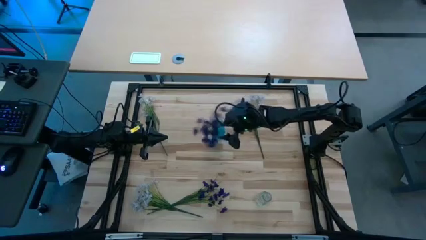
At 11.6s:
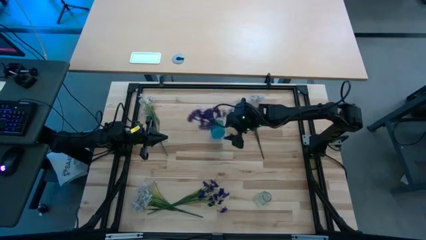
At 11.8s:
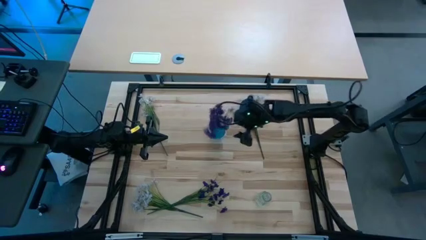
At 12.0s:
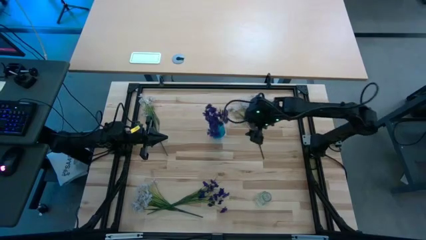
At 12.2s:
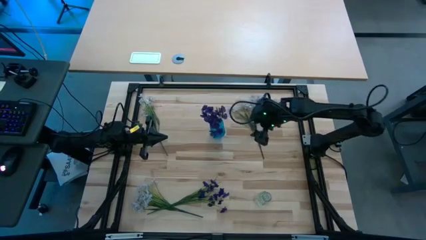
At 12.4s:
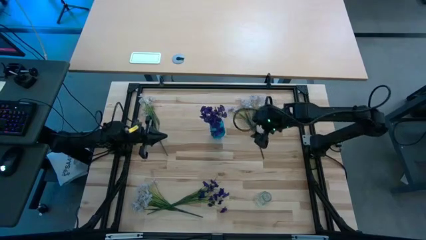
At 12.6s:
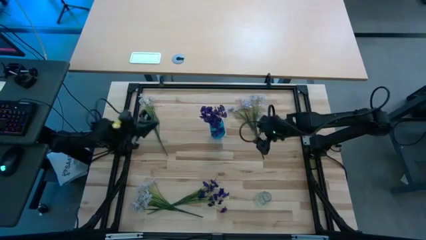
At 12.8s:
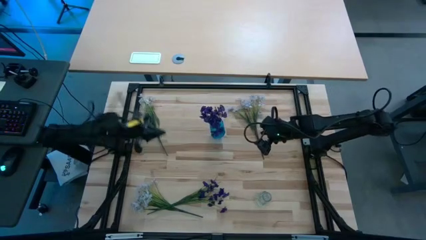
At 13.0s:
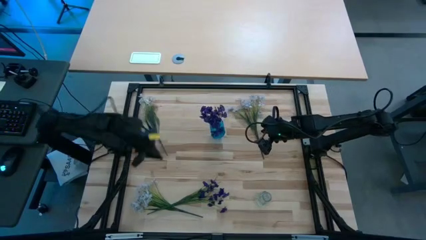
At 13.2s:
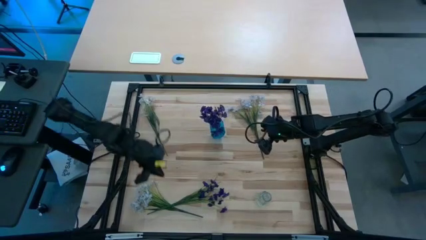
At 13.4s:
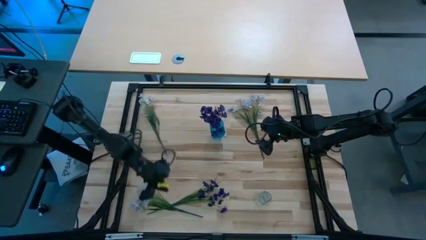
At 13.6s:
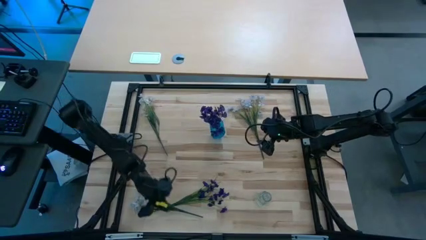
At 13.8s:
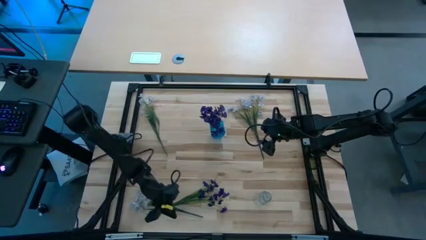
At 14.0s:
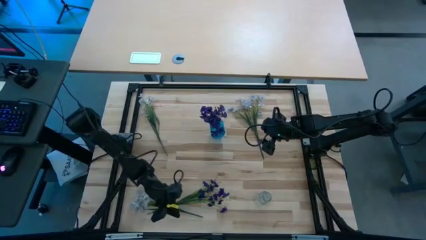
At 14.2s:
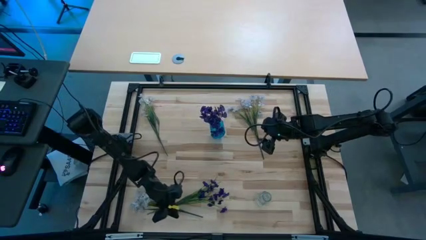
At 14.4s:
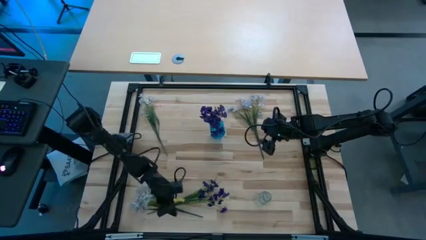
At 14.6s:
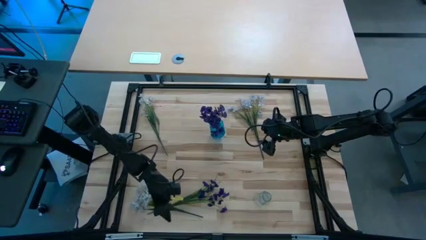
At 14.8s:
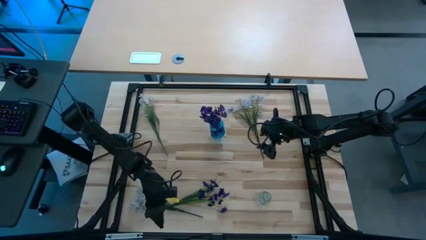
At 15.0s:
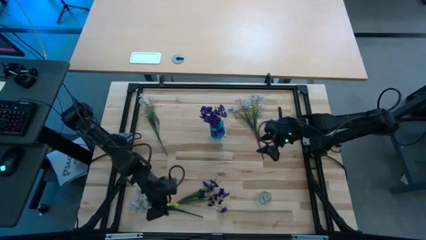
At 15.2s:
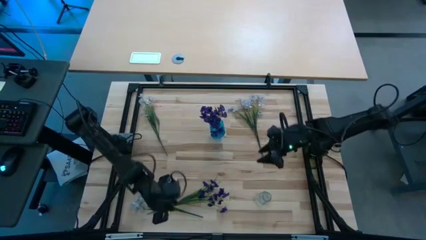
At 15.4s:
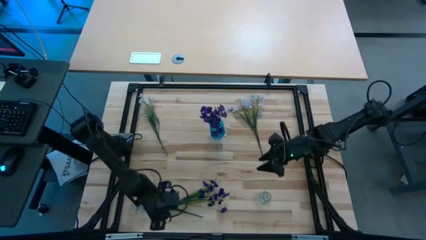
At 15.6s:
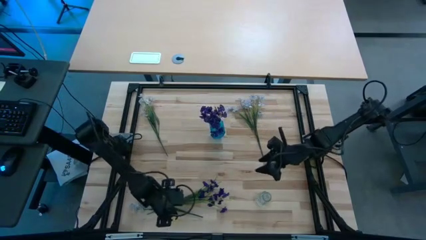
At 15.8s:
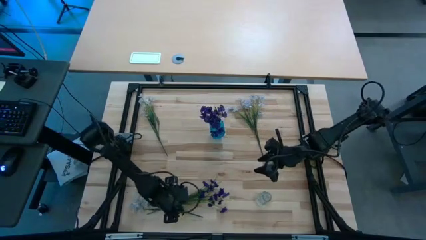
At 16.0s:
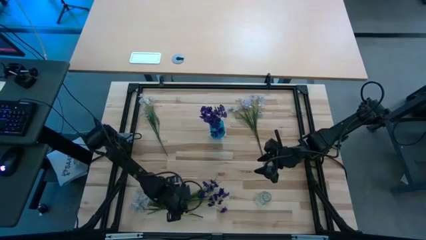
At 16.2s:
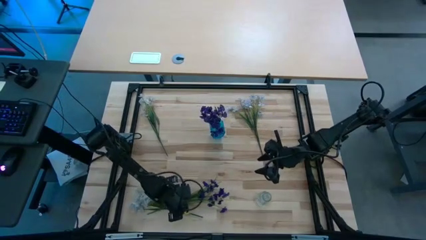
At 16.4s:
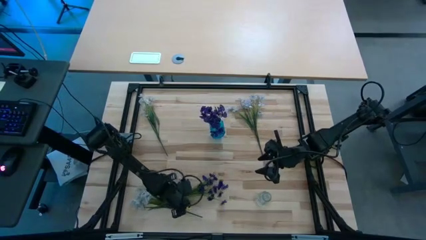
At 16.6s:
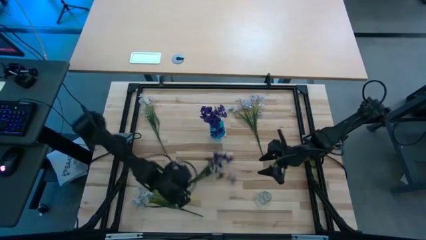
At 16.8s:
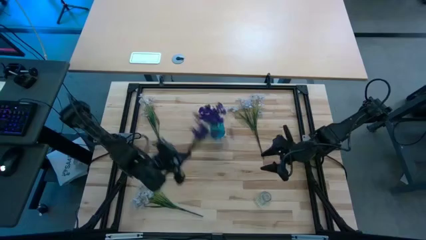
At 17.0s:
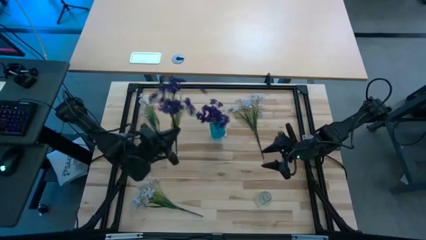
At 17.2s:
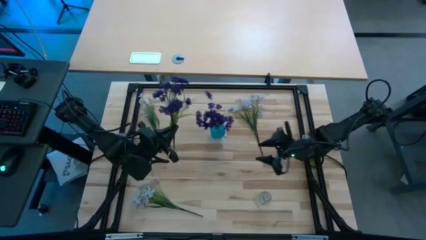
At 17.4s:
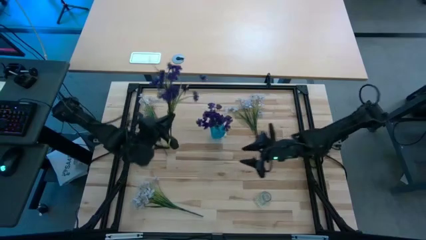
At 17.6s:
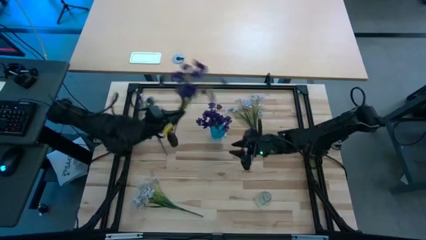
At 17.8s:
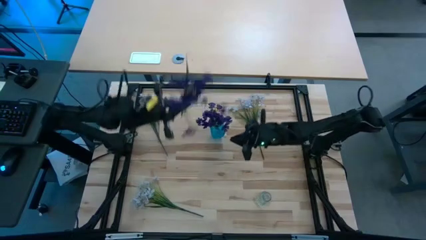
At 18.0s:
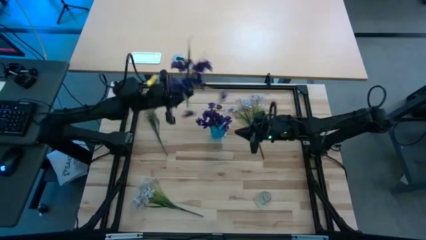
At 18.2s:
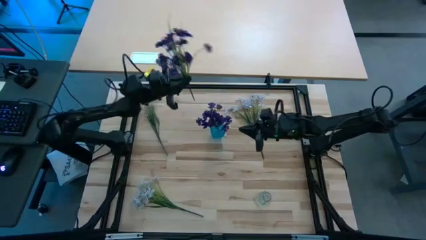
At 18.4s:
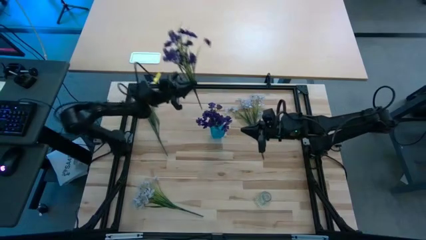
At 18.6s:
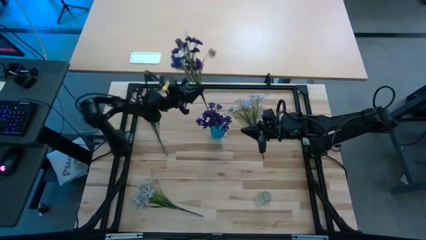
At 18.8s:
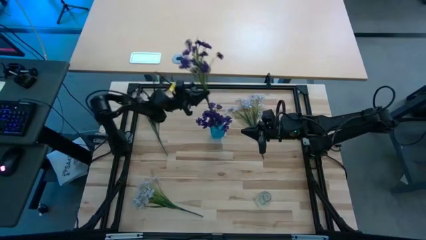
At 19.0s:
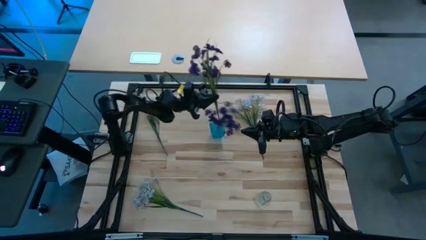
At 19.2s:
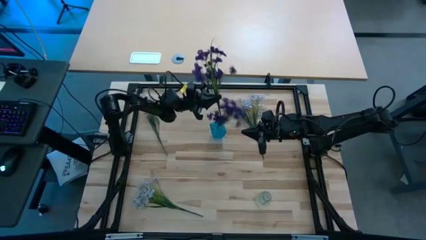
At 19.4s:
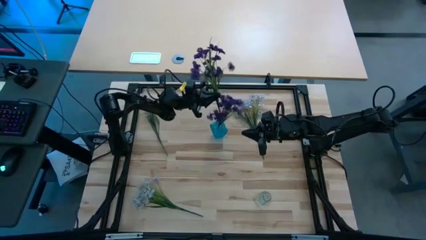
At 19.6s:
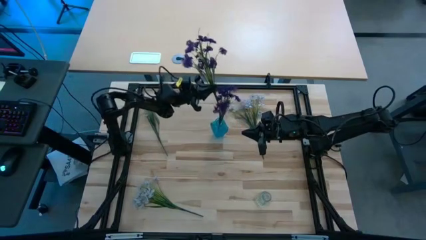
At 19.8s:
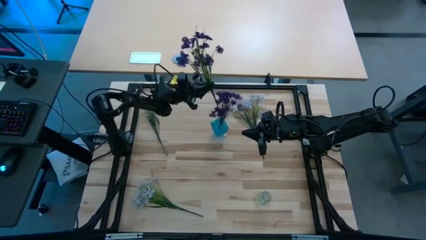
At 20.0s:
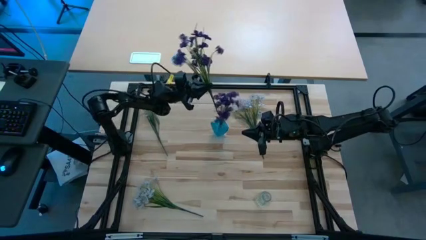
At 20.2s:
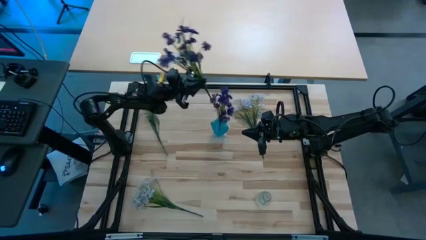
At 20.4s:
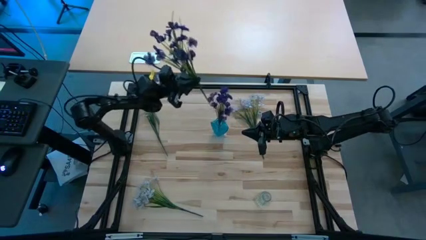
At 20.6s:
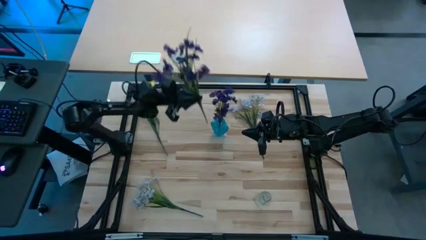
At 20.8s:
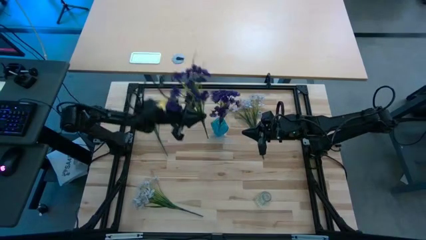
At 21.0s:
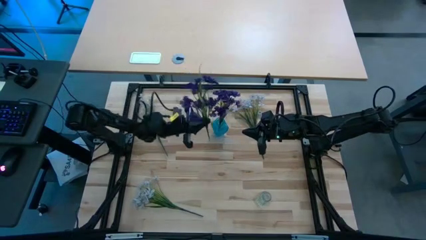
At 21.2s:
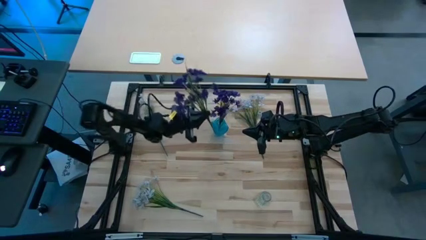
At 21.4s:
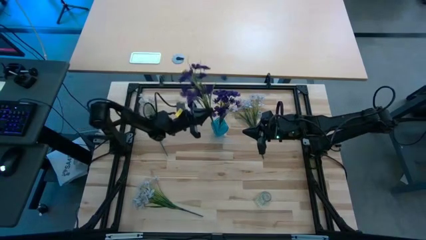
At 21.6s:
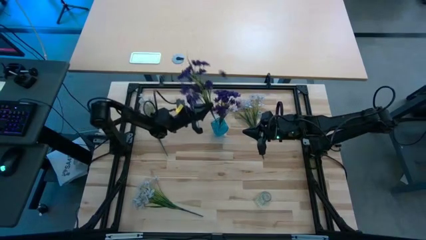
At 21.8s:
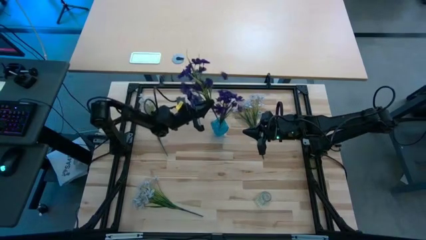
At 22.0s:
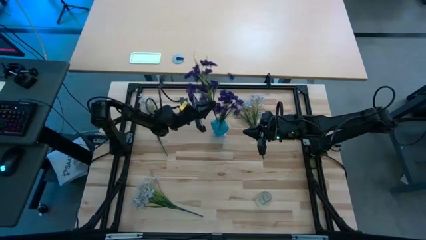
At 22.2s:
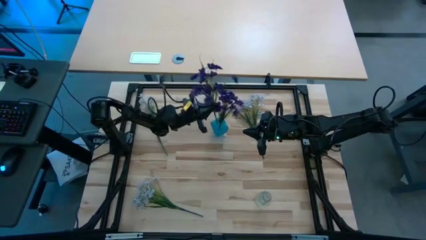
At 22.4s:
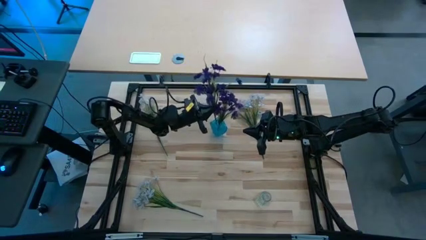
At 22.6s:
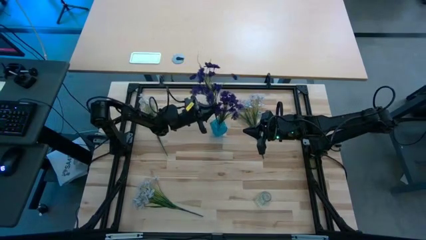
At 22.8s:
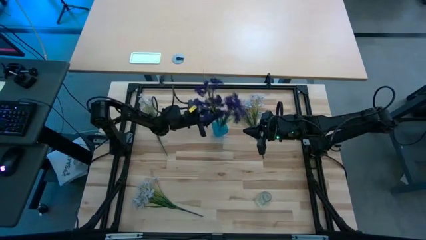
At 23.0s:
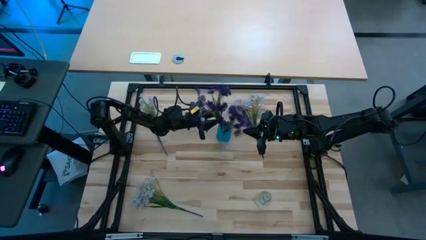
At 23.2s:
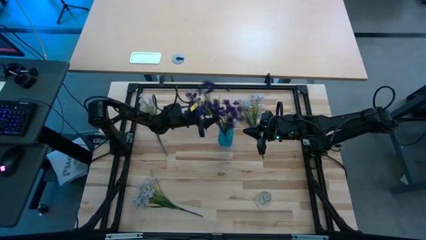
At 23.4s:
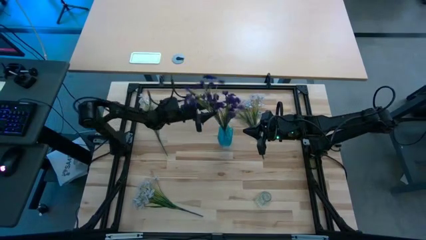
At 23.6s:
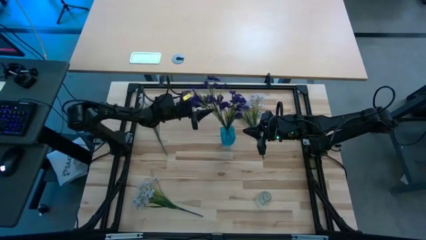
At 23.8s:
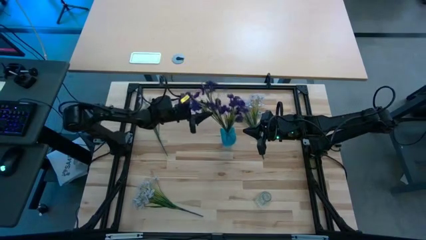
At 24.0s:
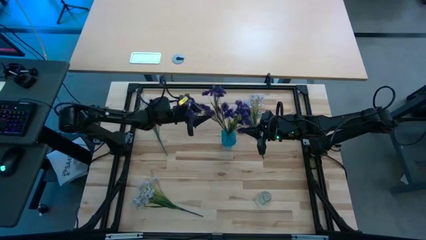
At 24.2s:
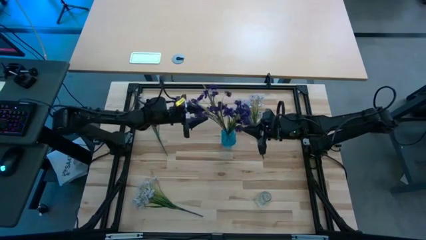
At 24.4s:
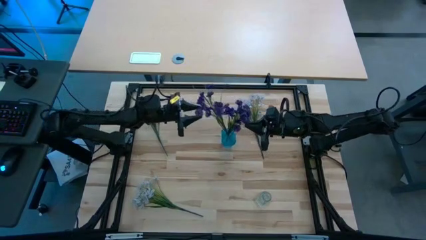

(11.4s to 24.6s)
Task: Sort flowers into vase by color
Put the purple flowers into the blue crystal vase
